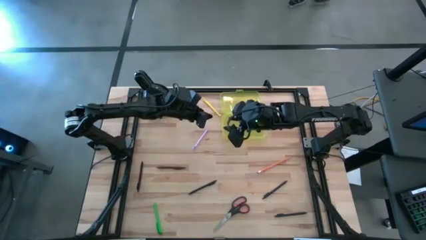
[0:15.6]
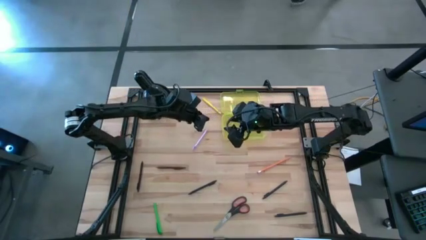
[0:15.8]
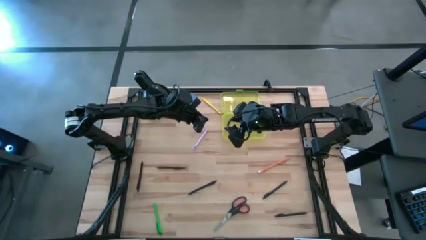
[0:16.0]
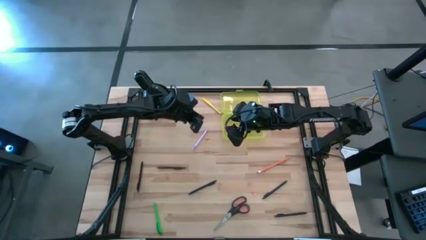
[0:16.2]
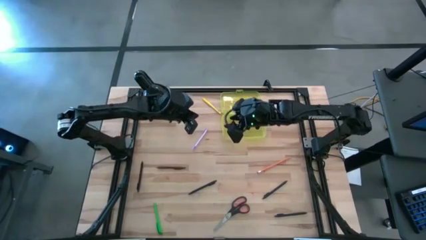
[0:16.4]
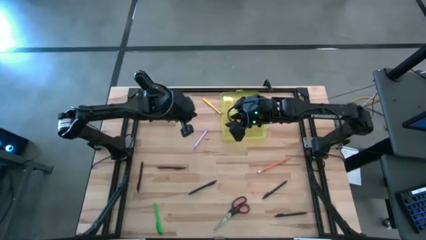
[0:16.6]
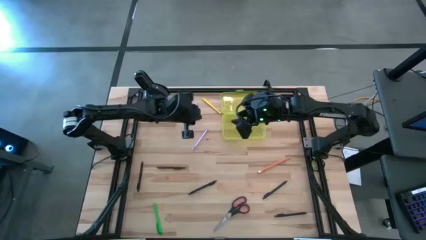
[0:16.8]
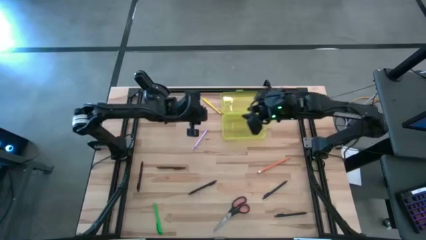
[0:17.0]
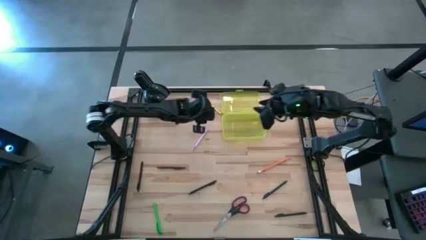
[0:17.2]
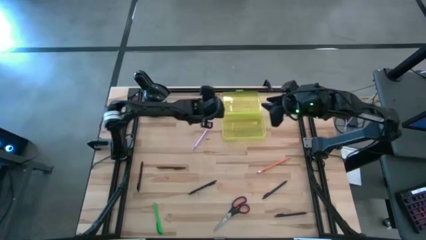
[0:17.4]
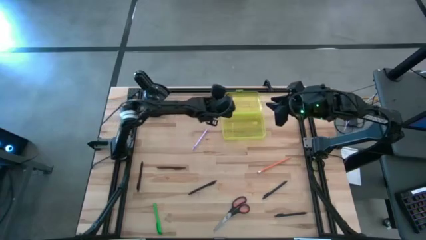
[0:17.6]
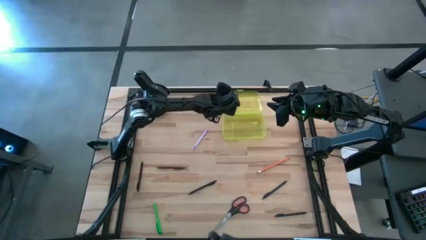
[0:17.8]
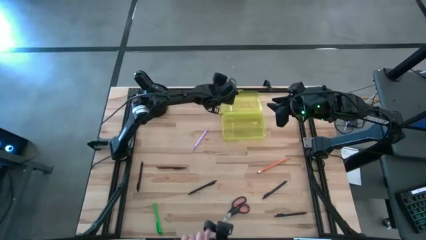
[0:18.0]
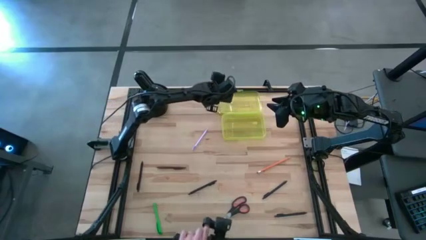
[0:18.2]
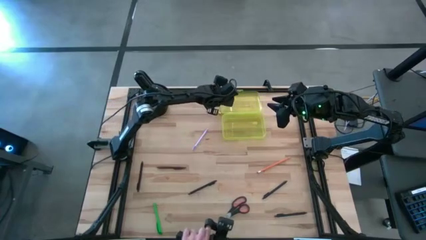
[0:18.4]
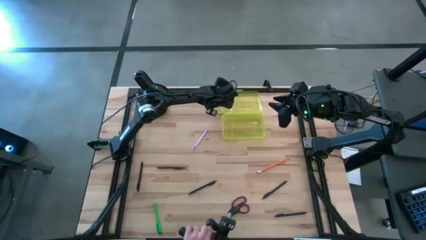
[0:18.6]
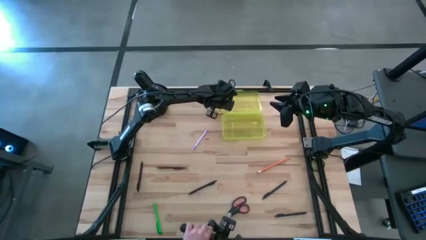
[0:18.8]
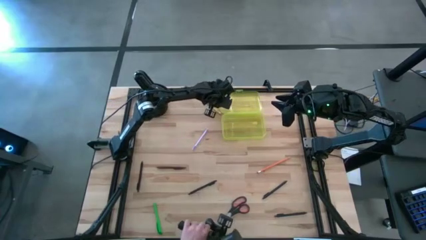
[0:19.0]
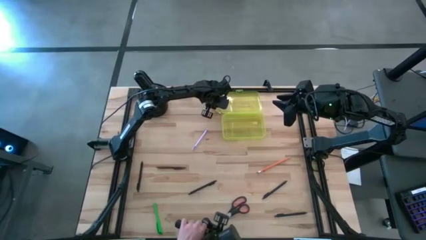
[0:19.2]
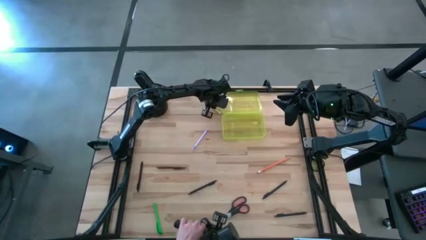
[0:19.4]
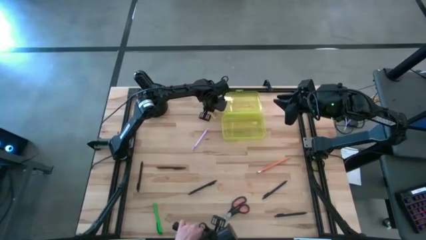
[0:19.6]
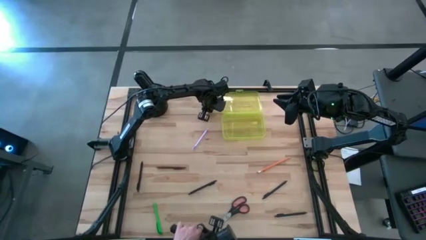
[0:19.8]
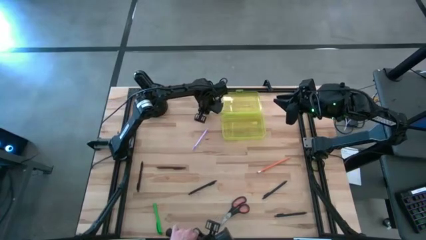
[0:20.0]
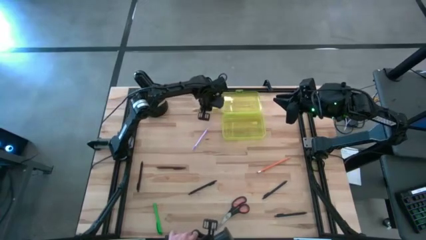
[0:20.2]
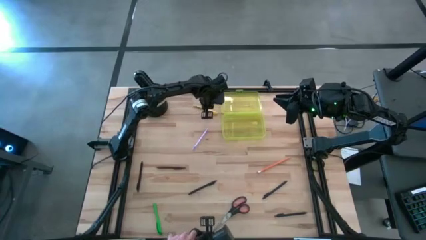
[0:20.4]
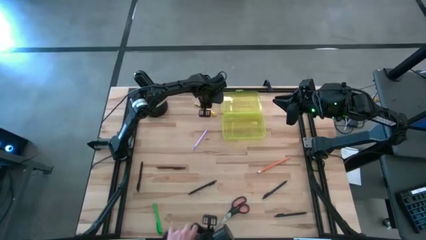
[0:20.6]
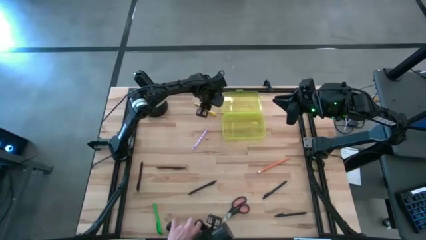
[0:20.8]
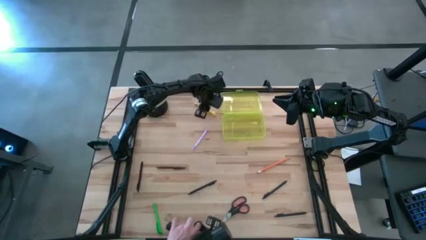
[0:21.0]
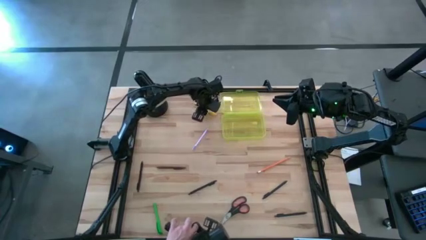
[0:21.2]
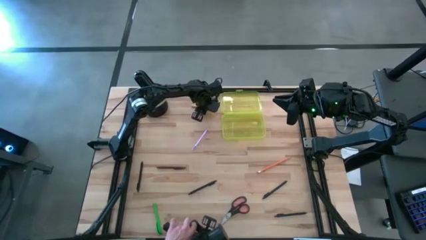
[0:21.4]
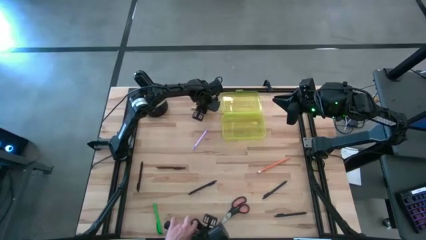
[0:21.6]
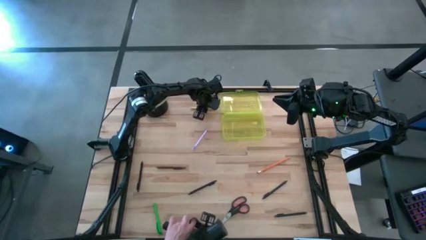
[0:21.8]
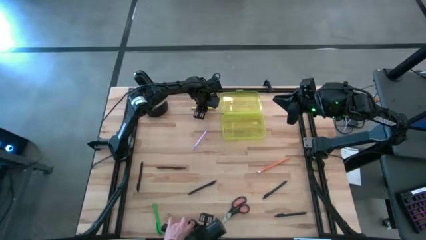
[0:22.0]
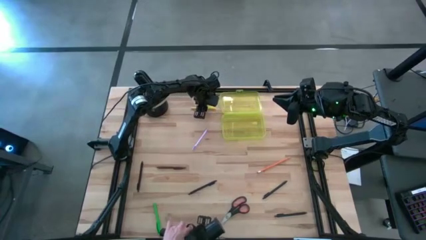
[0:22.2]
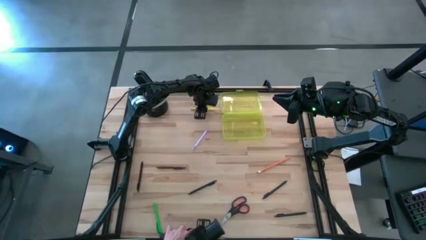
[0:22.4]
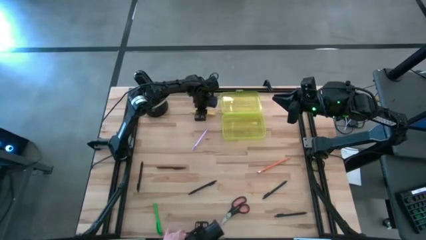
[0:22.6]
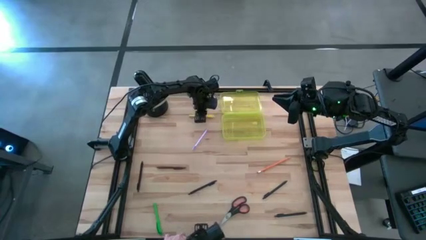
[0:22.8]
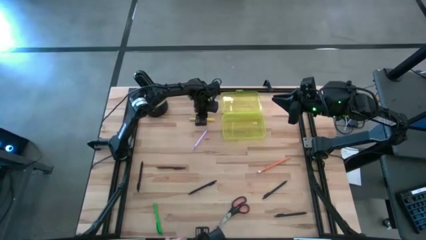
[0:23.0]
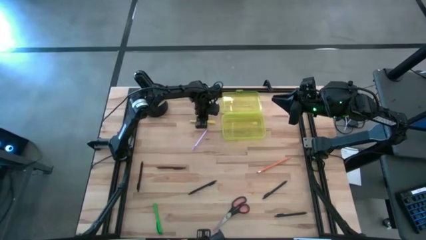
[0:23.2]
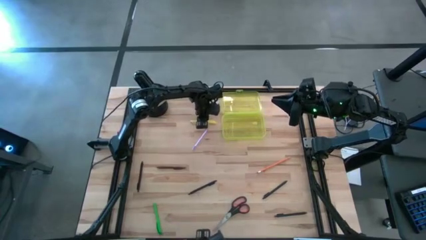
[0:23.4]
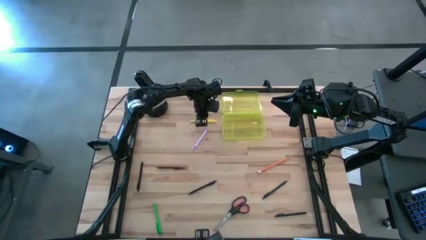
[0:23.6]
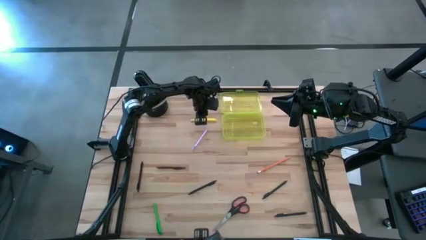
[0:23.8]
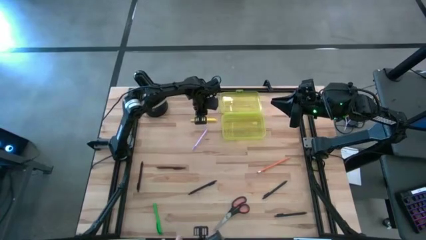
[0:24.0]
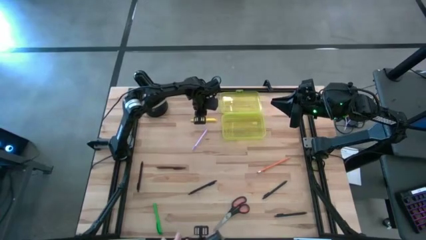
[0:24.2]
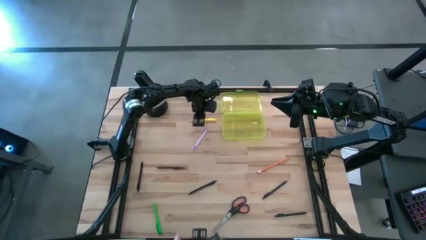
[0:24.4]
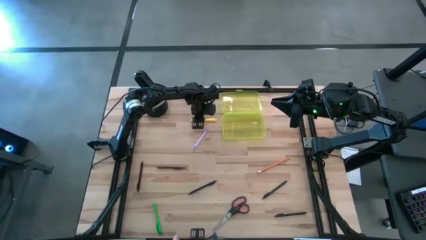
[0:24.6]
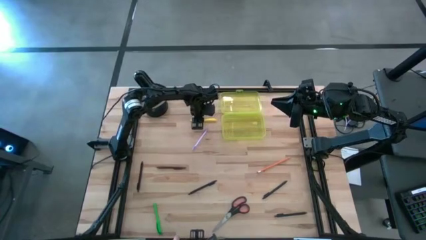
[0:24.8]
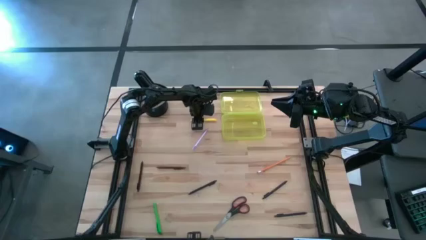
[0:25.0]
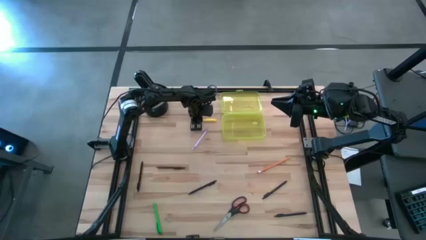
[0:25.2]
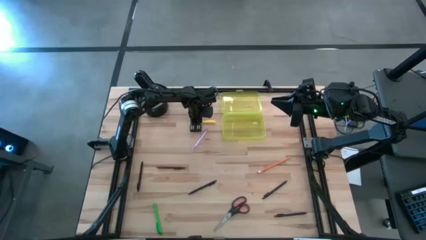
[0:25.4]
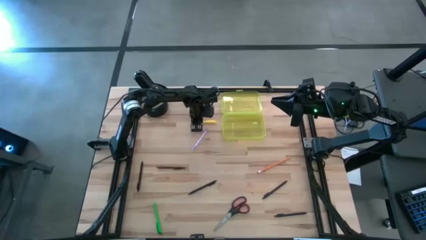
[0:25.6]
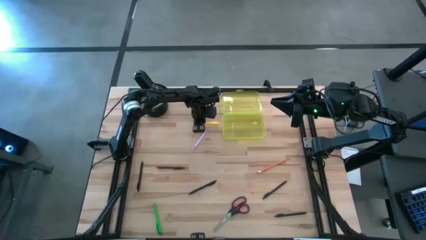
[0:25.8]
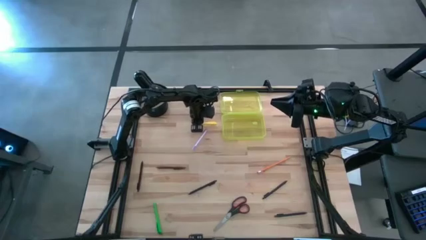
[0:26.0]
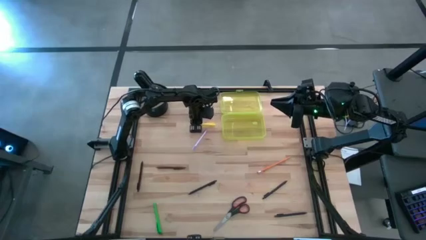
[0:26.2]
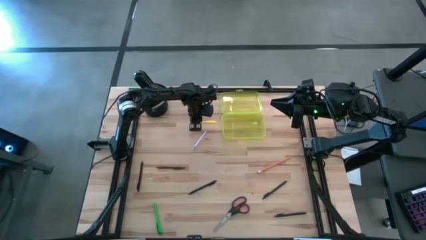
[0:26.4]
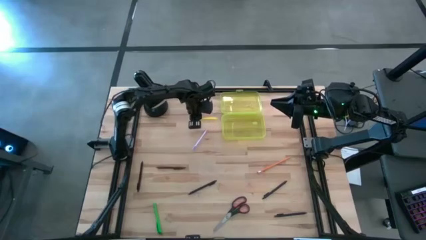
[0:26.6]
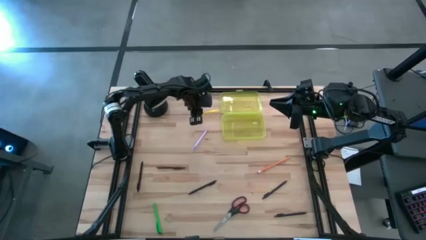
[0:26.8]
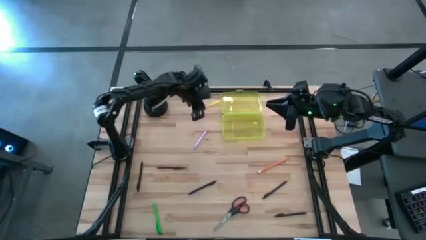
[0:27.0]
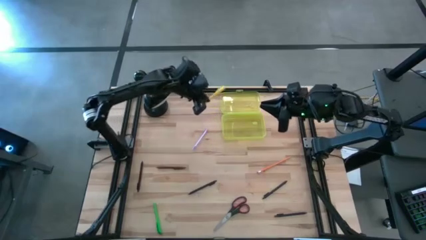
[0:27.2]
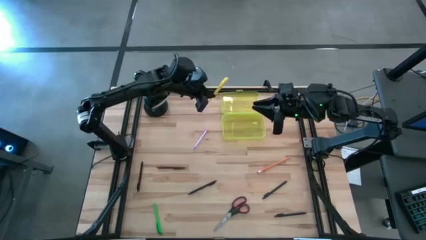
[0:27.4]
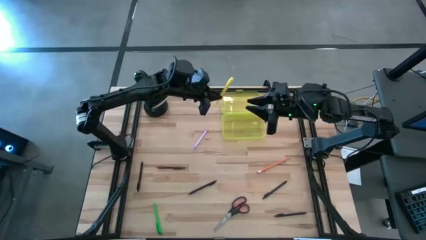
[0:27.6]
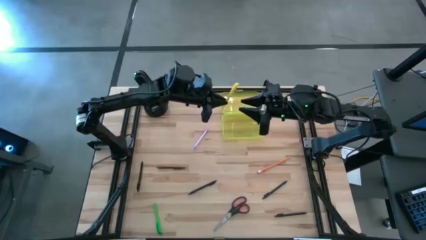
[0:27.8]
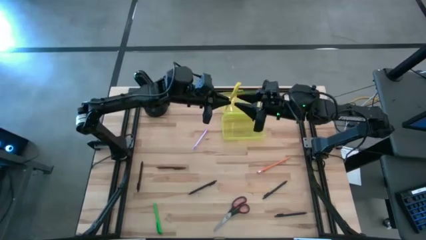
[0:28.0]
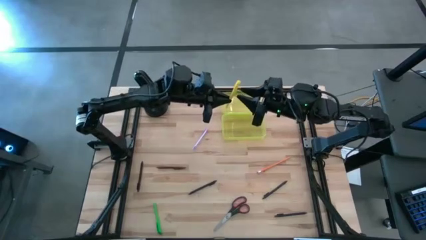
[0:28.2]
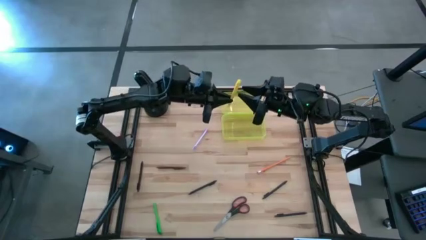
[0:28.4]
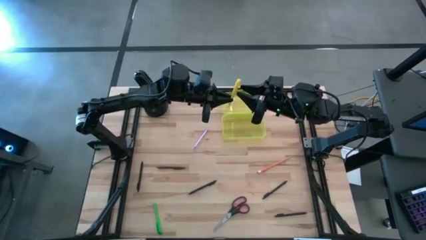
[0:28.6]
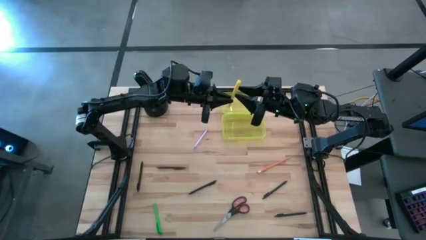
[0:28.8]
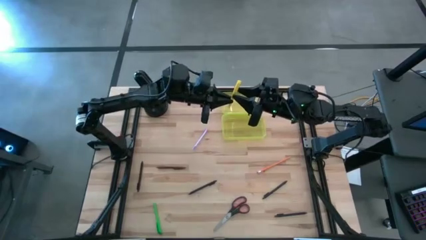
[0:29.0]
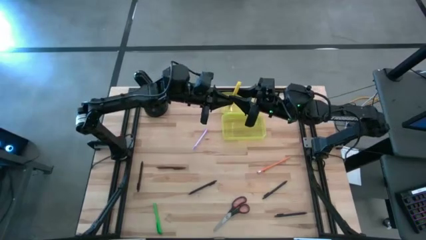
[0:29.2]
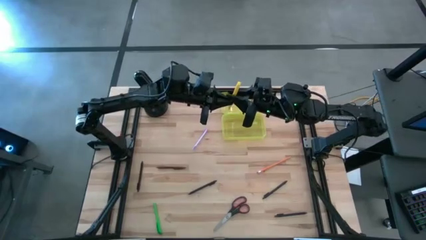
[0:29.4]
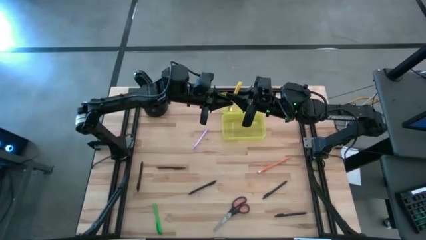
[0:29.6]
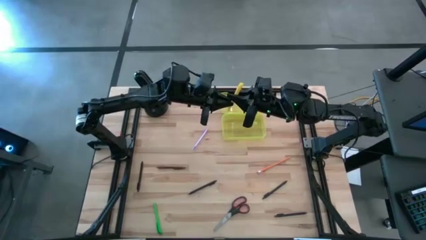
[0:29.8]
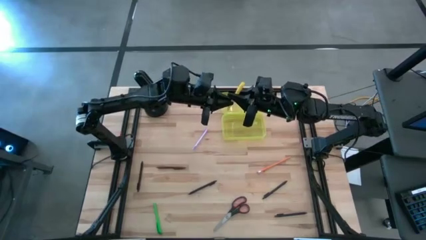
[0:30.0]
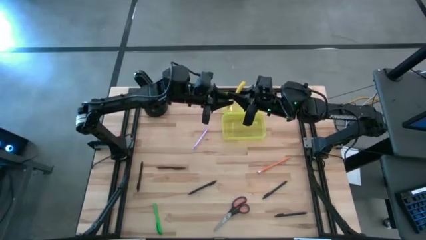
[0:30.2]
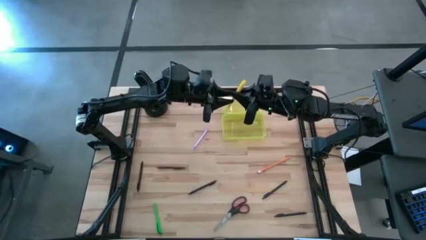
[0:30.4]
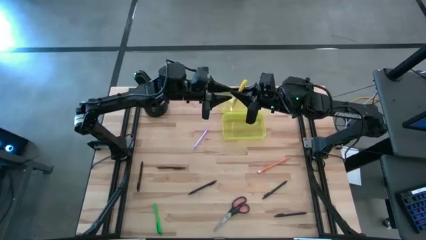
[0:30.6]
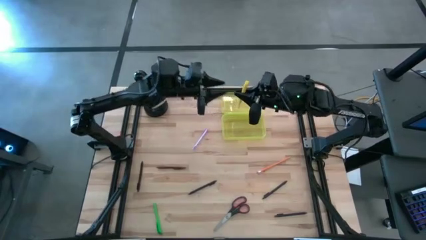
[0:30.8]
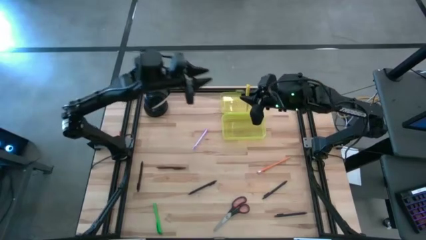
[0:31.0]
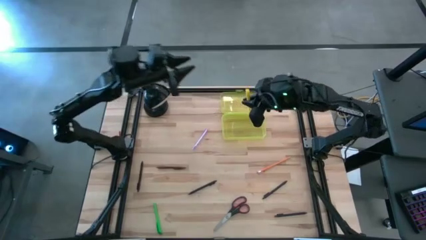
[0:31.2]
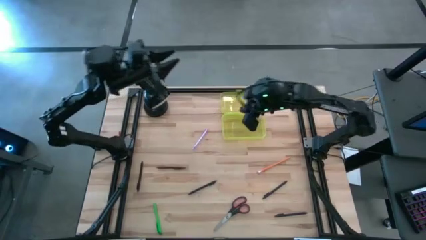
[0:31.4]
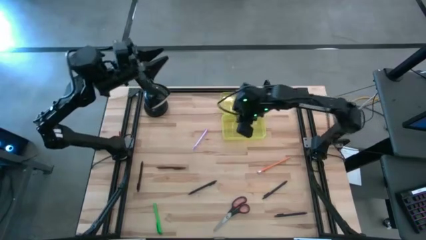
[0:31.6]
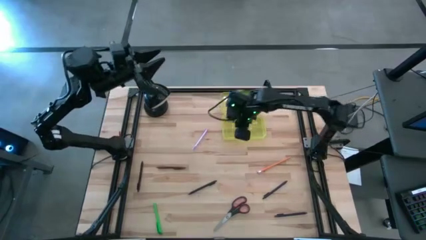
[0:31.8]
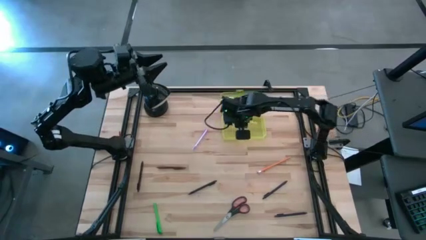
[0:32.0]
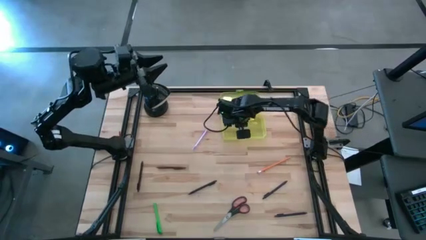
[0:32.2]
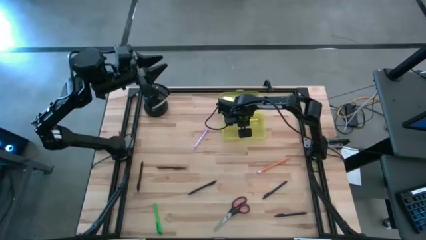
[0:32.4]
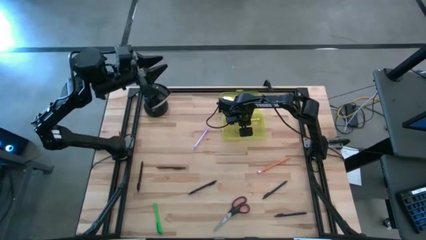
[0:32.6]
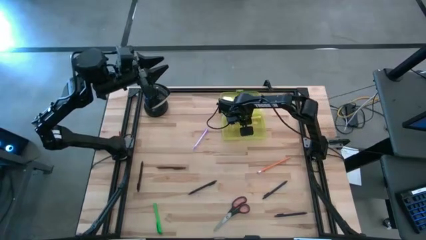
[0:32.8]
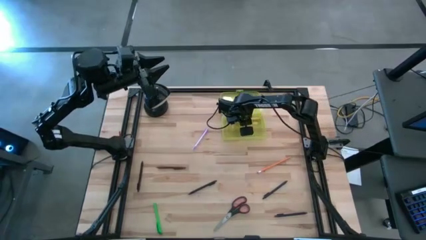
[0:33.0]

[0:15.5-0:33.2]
Task: Pick & place school supplies into a supply box
Put the yellow pen into the supply box
